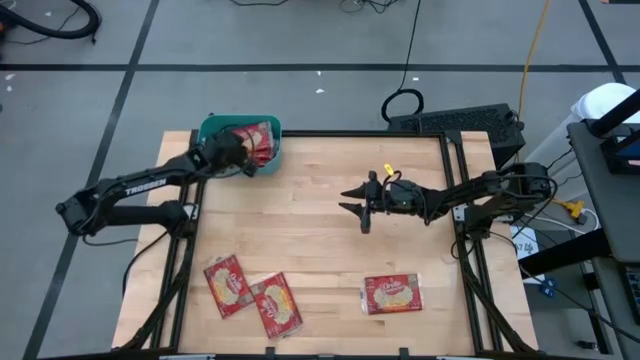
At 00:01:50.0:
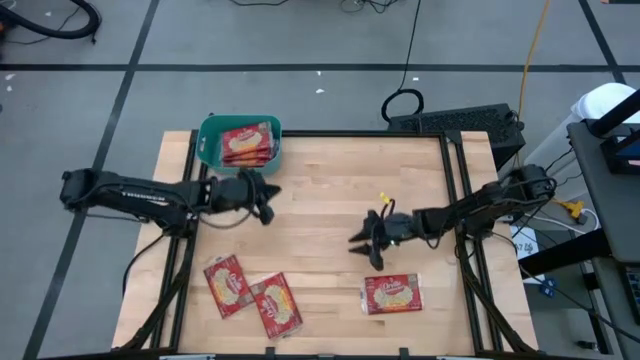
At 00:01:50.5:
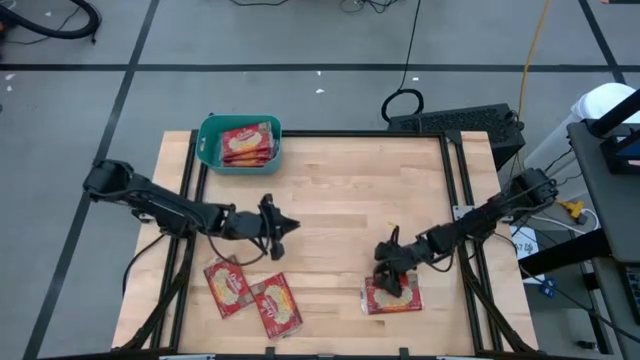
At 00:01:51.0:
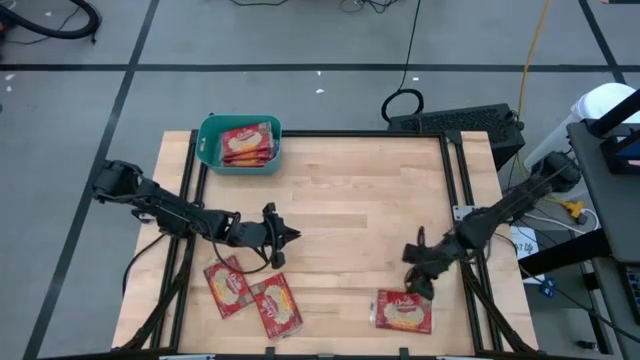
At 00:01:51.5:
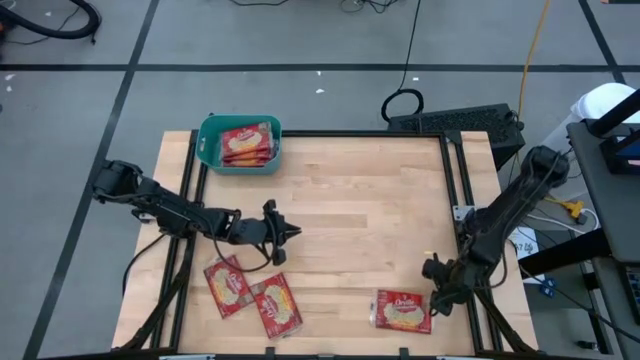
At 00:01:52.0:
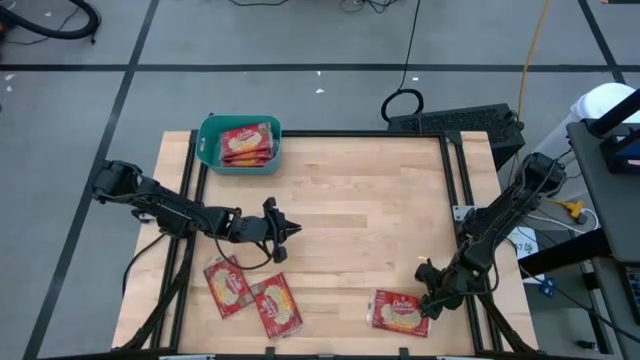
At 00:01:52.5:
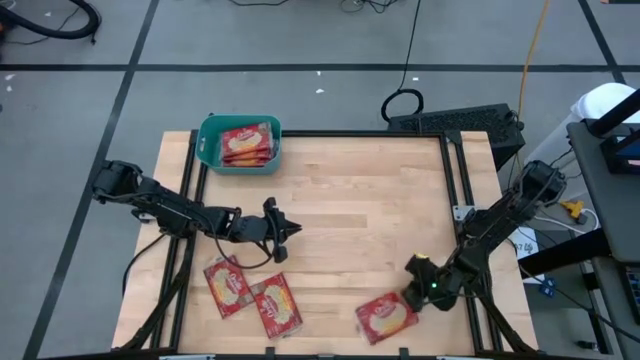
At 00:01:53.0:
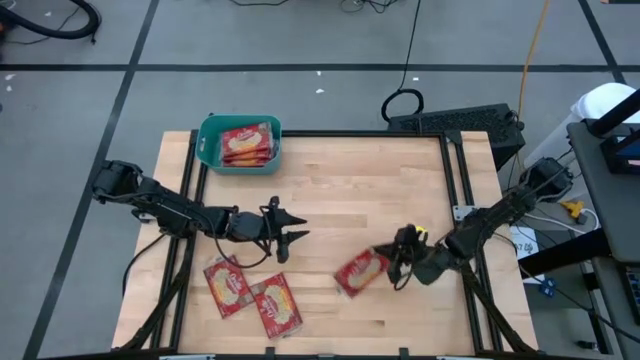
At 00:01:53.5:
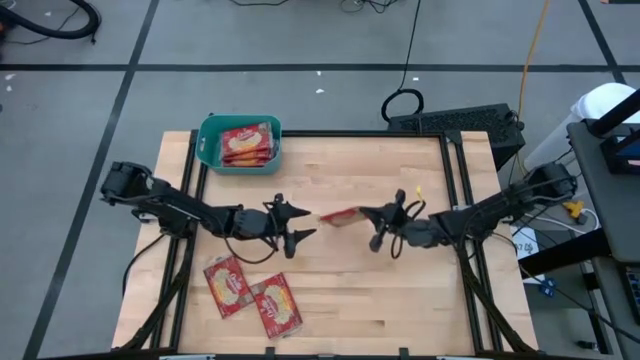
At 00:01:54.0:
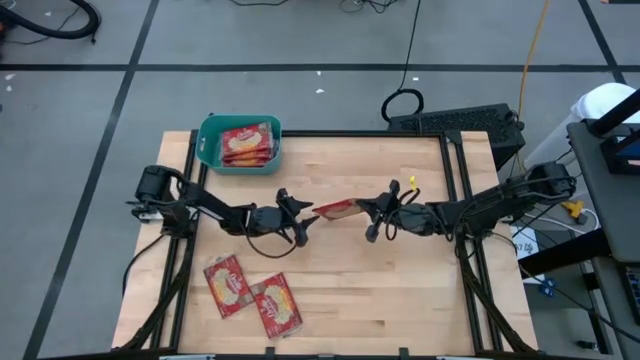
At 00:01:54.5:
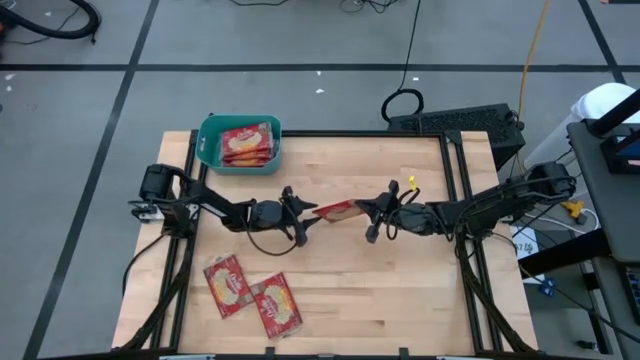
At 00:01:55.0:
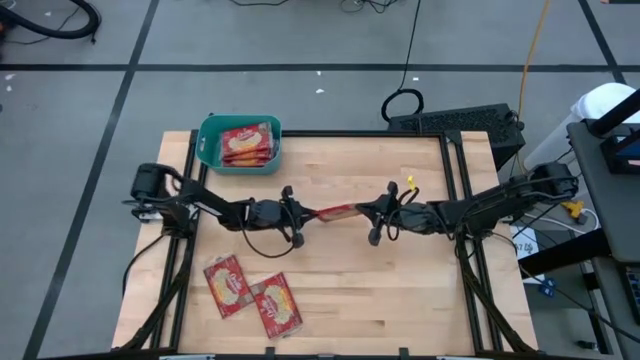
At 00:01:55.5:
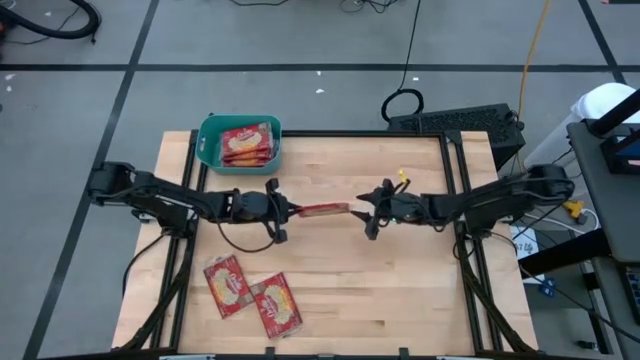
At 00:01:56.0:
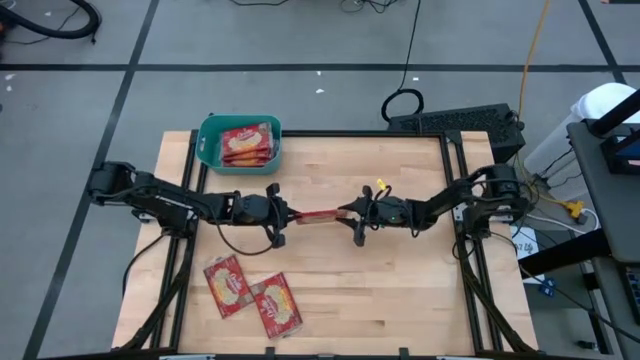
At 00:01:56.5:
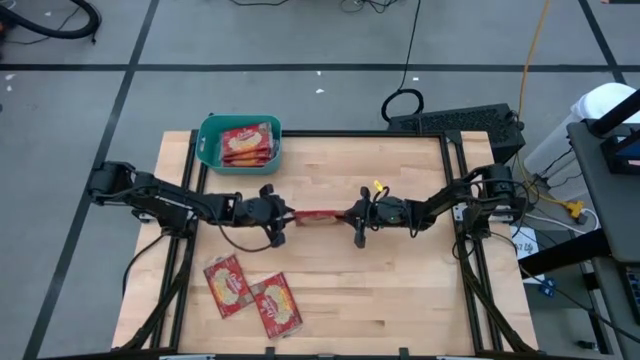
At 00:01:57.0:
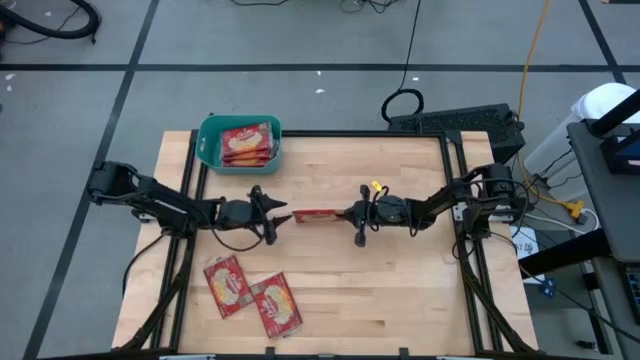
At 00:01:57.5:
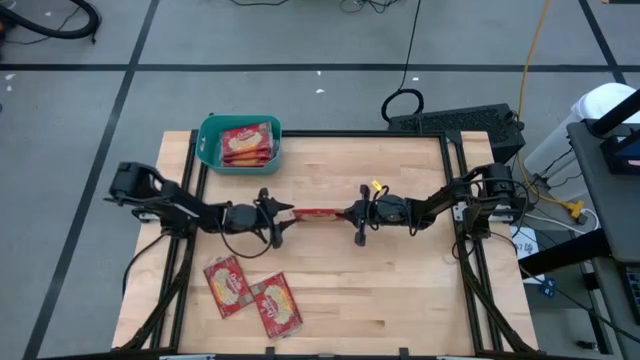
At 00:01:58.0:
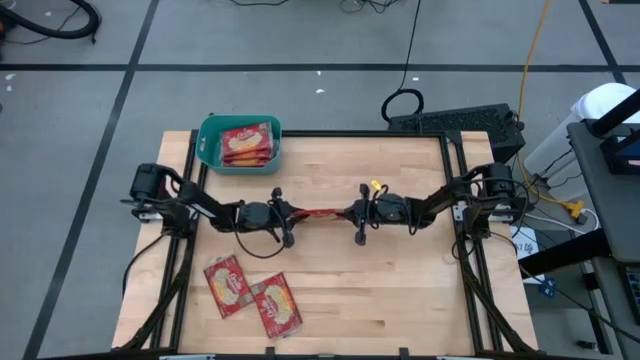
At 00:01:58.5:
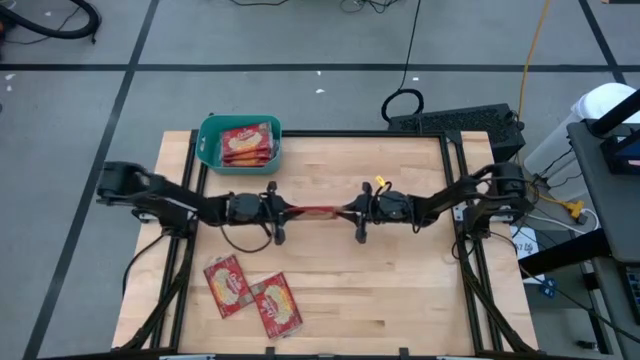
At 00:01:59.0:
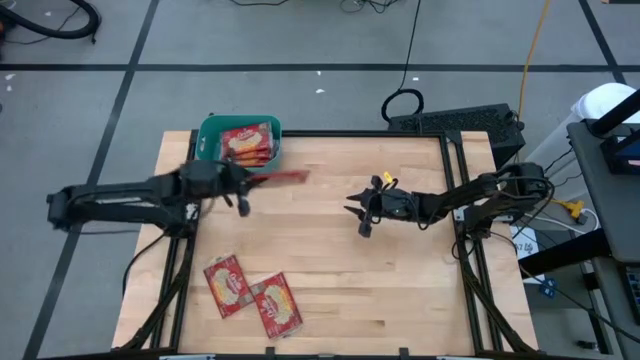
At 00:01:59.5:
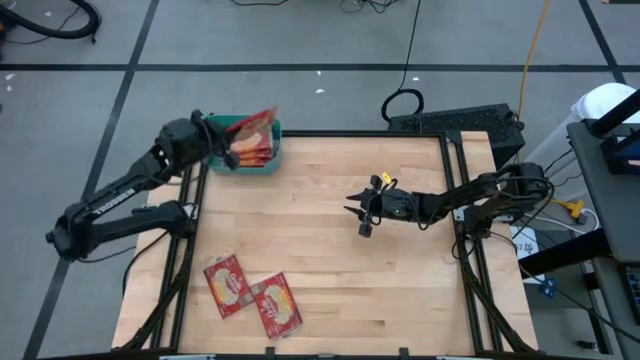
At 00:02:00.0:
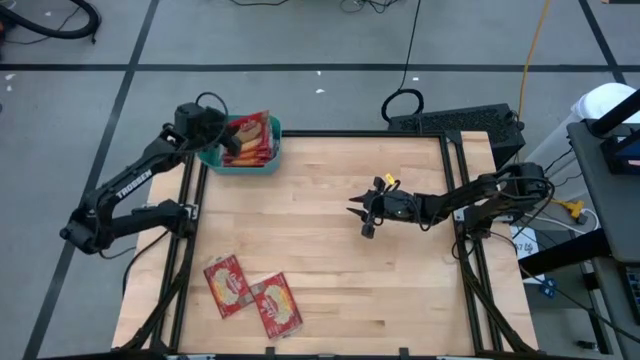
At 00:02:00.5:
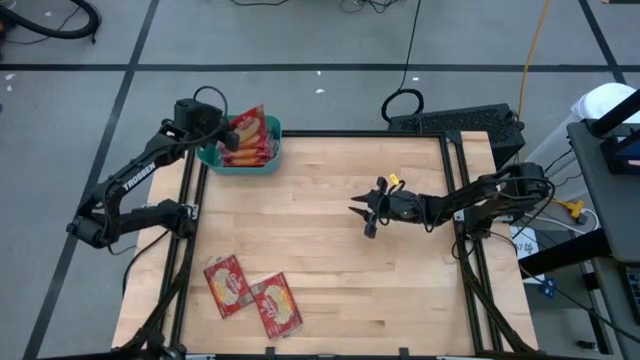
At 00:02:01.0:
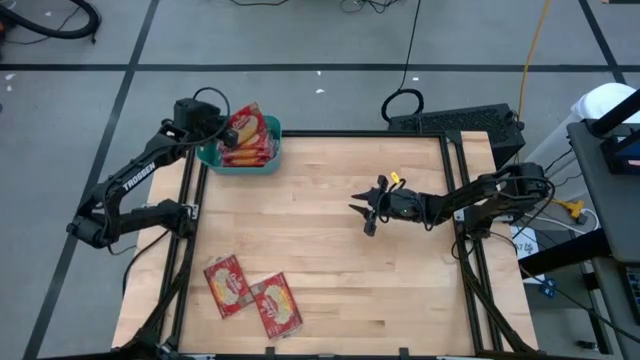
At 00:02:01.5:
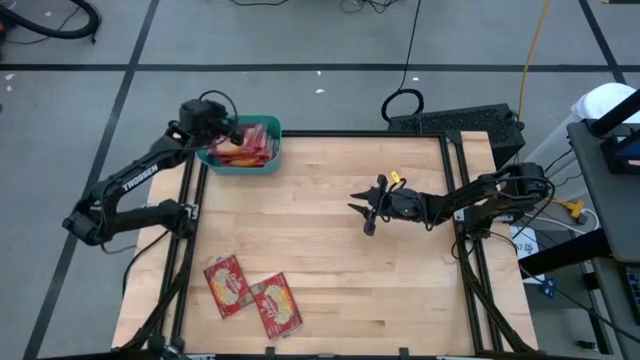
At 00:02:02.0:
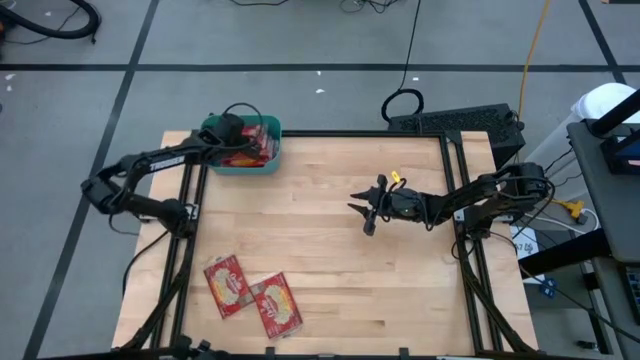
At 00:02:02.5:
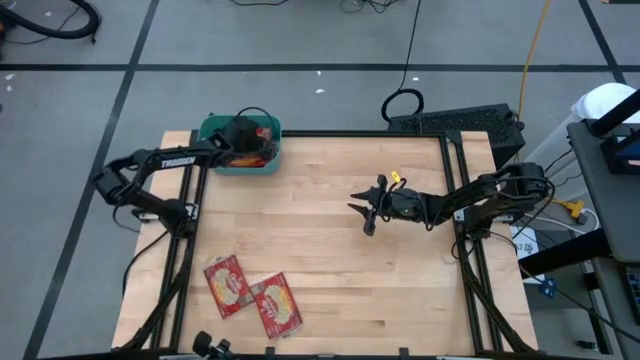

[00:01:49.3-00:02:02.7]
Task: Sort popcorn bags into baskets
Put the red popcorn bag into the green bin

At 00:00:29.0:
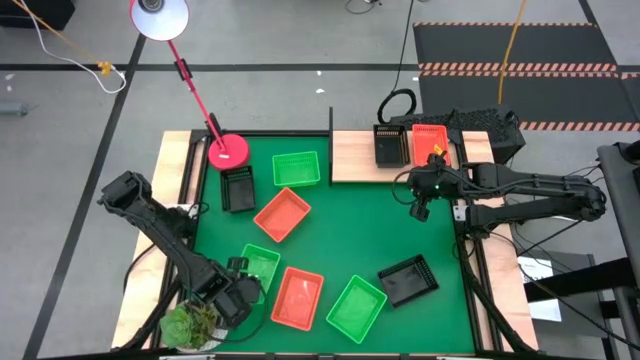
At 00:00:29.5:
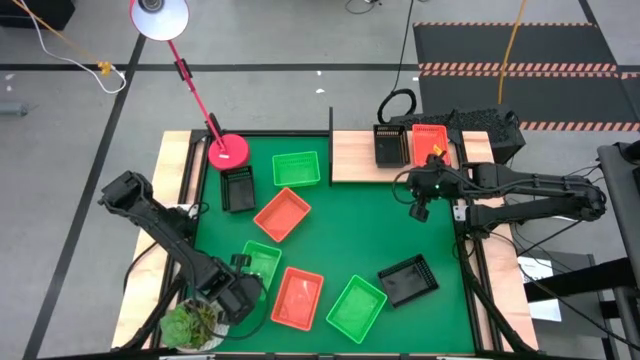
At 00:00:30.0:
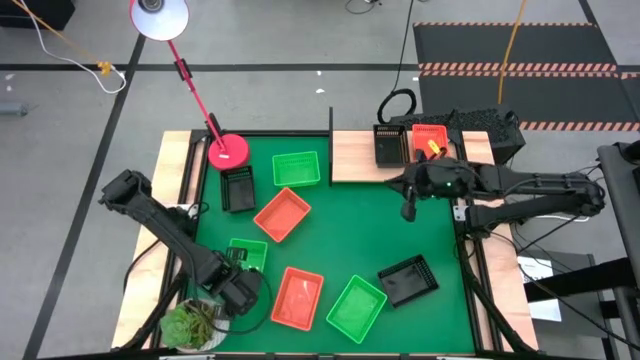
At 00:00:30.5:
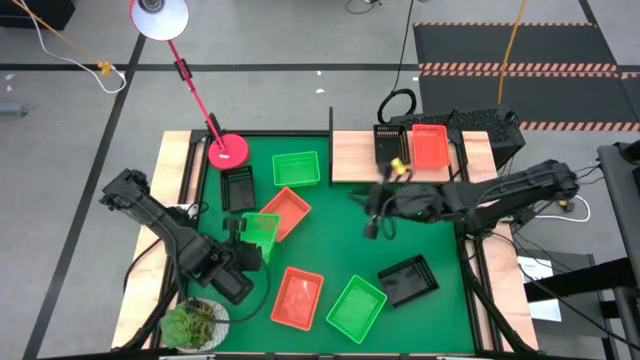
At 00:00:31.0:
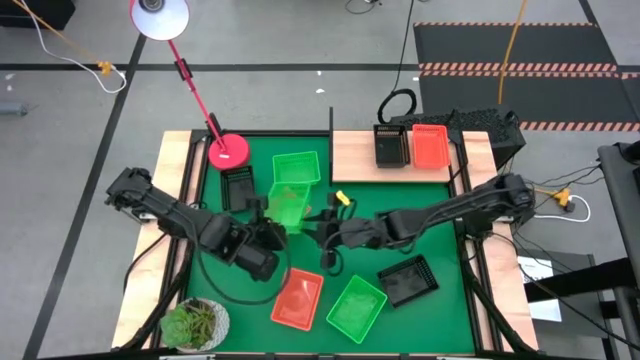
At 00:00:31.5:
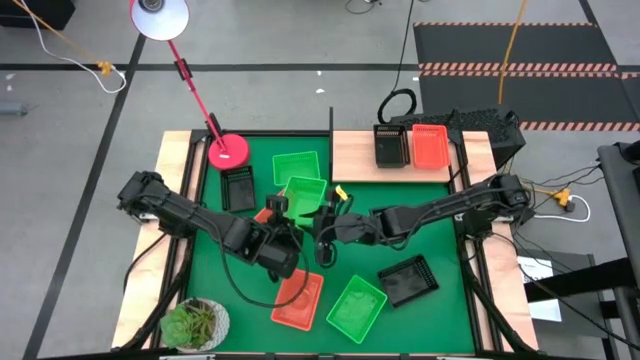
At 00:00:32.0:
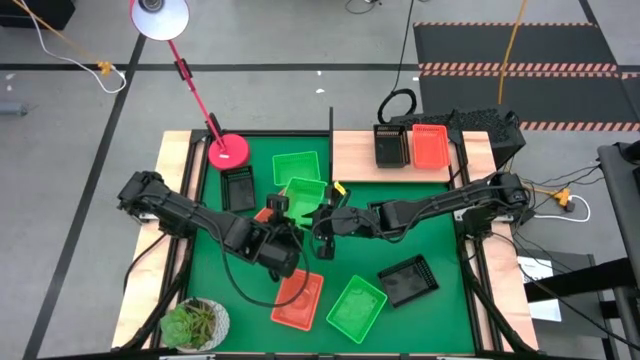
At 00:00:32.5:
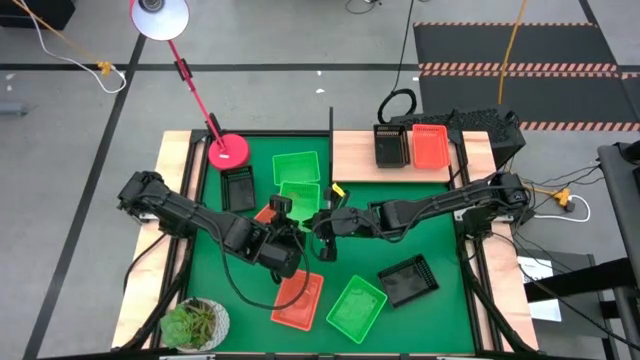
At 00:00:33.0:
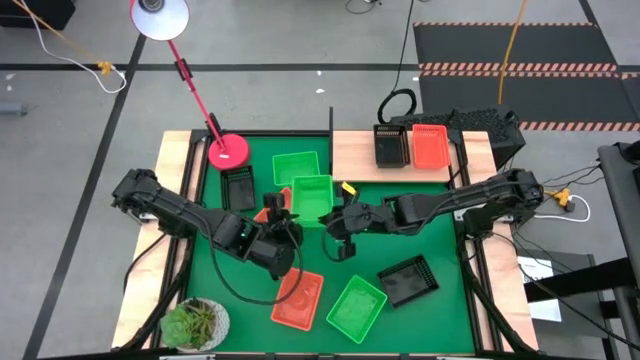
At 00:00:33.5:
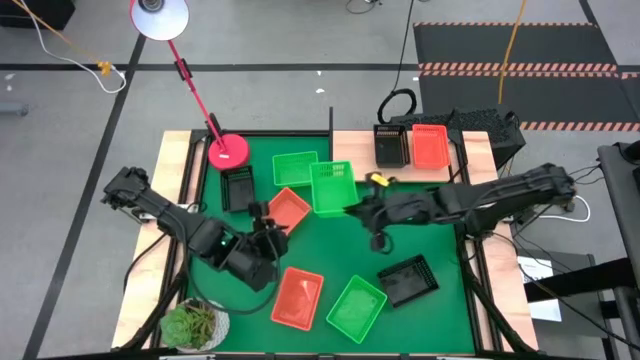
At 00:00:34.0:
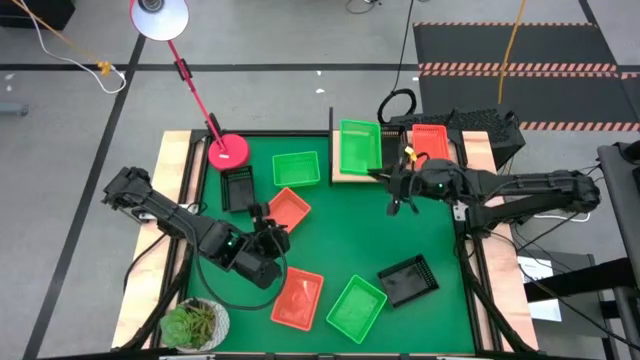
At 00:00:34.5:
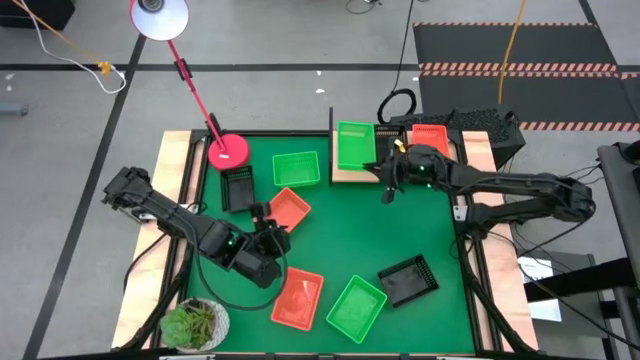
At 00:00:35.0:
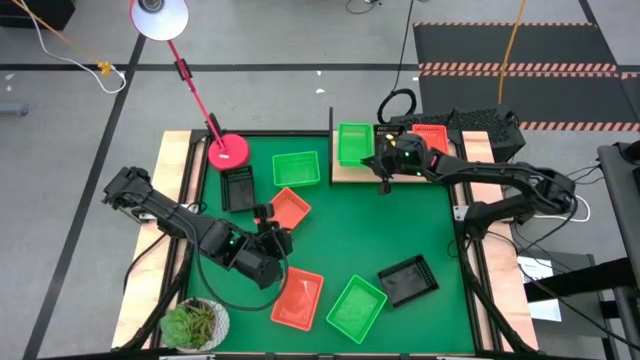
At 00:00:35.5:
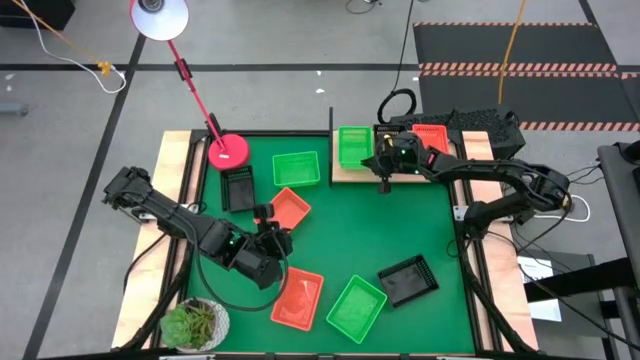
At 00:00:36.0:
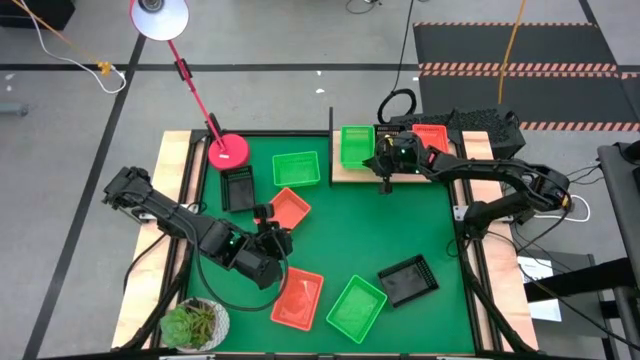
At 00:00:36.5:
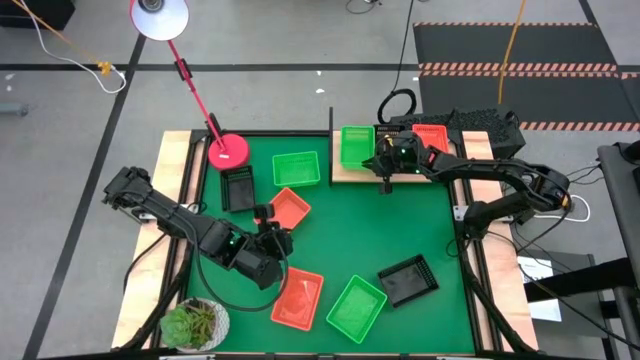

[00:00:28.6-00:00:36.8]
Task: Stack baskets on shelf by color
Put the bottom left green bin on the shelf

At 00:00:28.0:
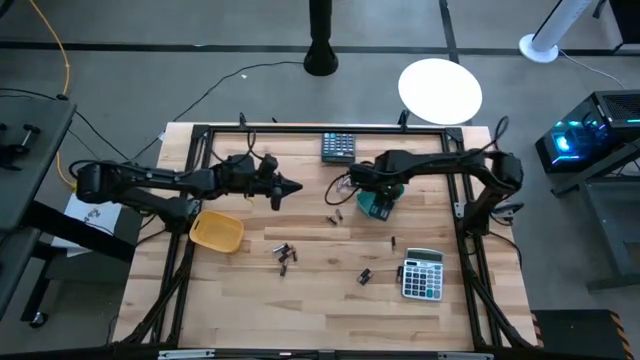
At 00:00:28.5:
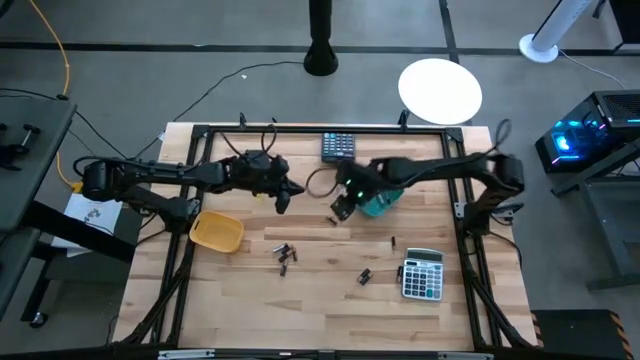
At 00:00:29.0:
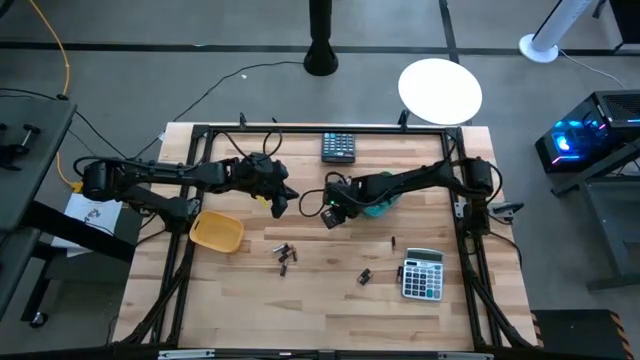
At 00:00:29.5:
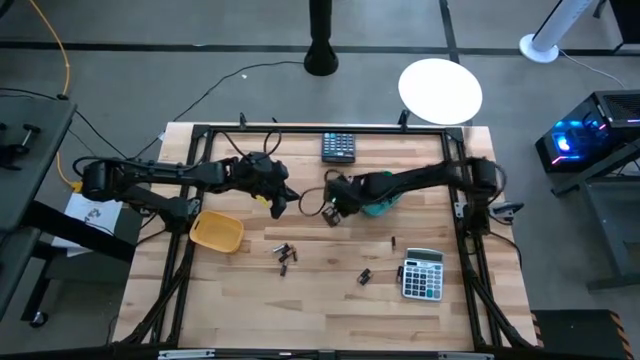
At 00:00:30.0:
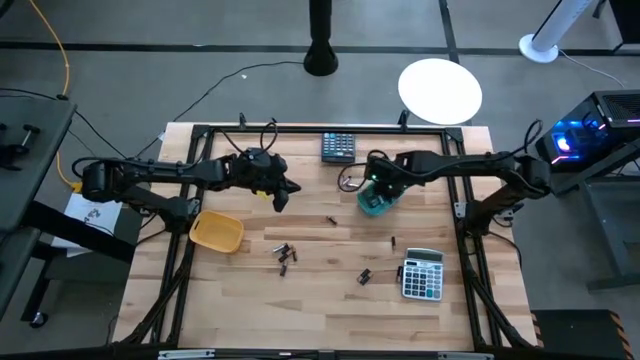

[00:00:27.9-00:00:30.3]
Task: Sort batteries
Put the silver battery into the green bin
